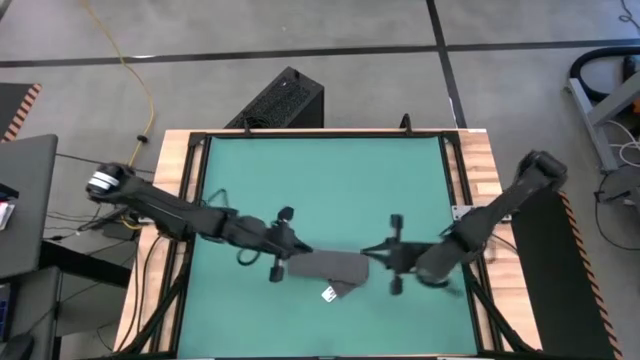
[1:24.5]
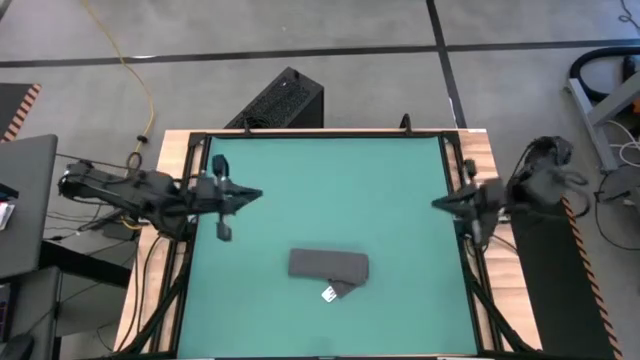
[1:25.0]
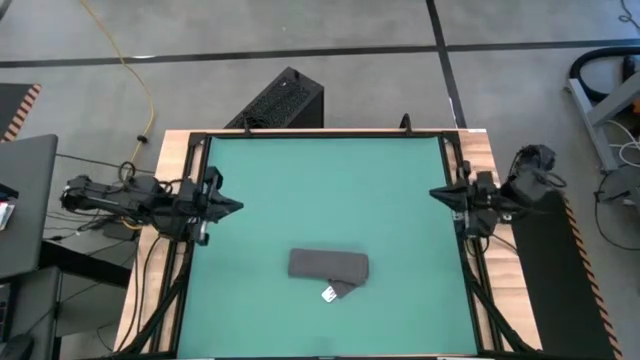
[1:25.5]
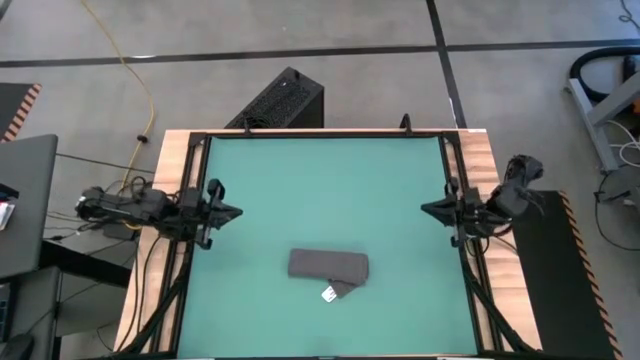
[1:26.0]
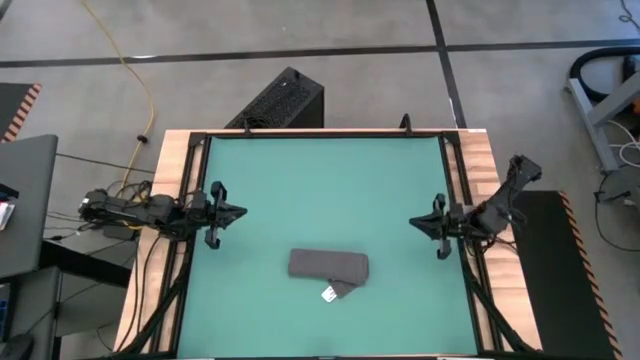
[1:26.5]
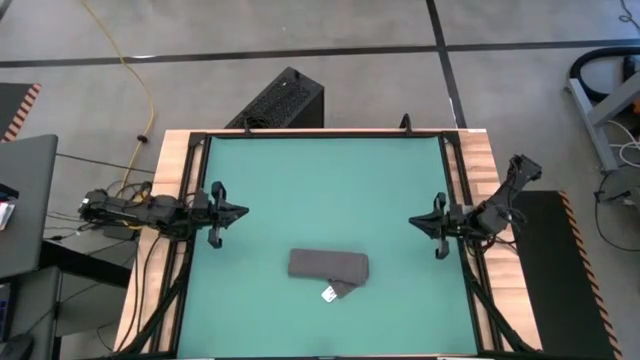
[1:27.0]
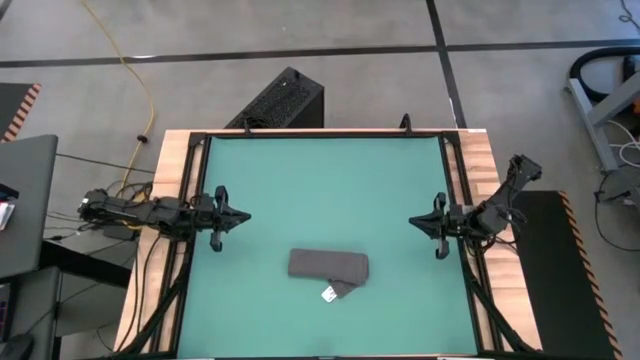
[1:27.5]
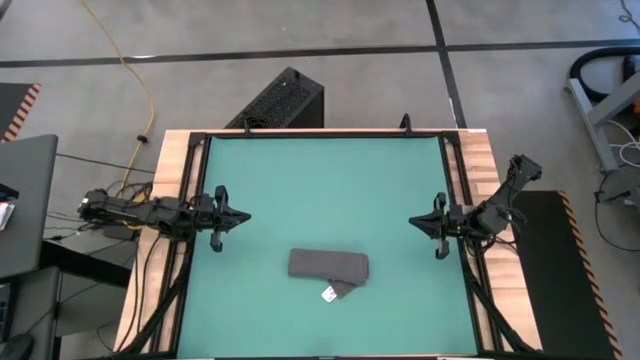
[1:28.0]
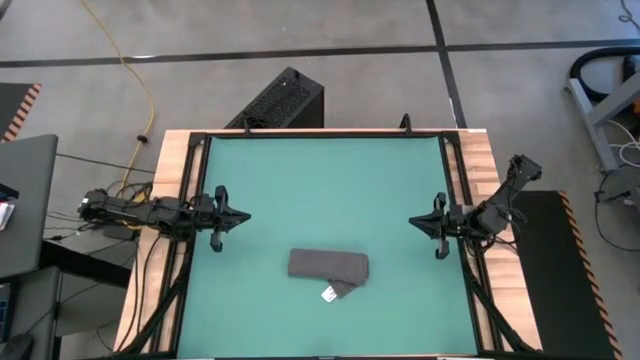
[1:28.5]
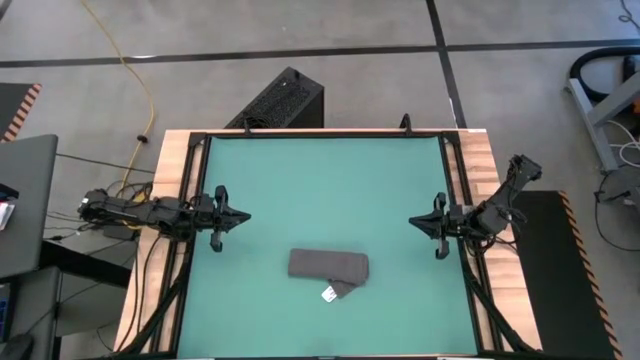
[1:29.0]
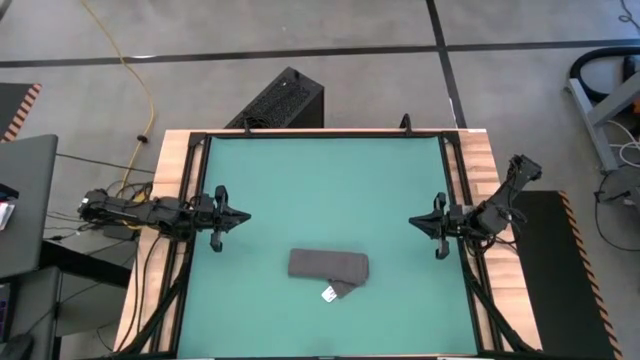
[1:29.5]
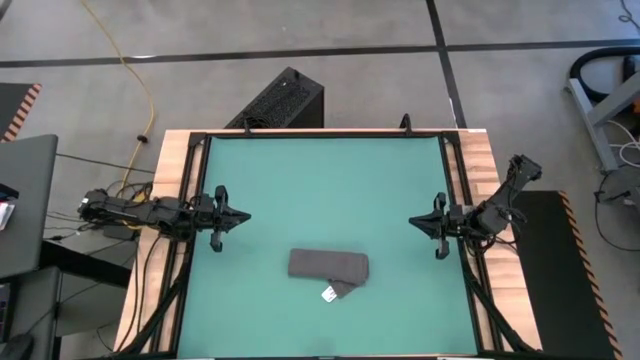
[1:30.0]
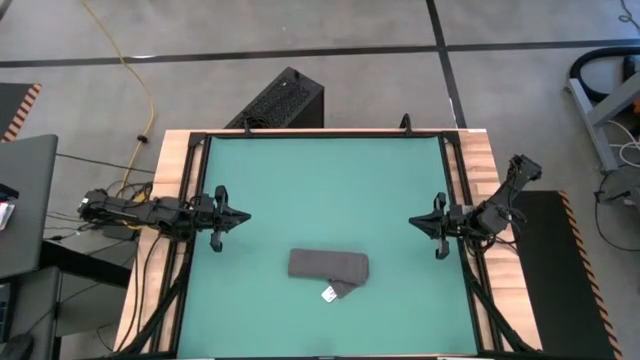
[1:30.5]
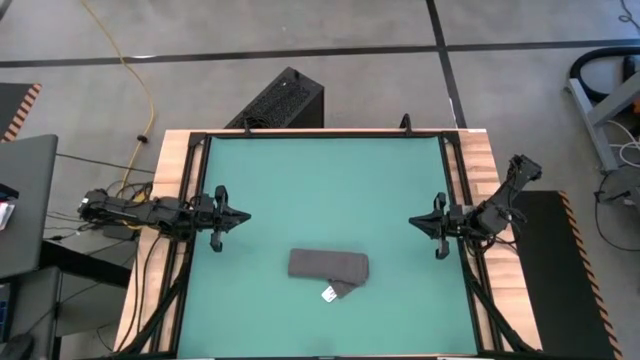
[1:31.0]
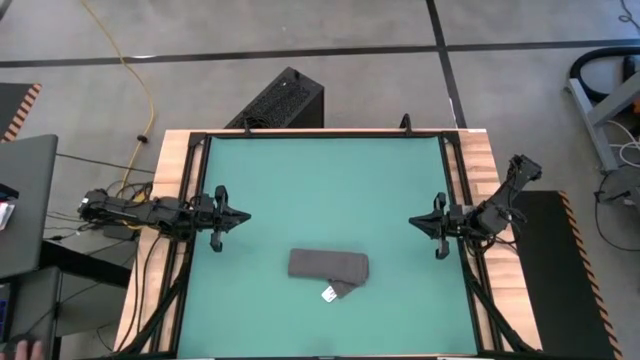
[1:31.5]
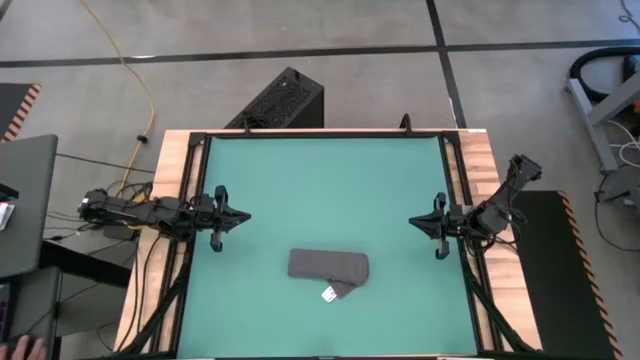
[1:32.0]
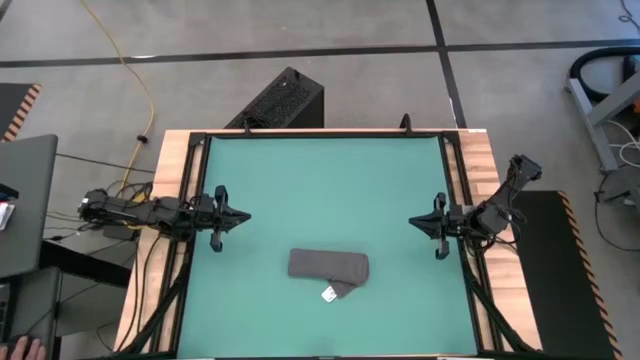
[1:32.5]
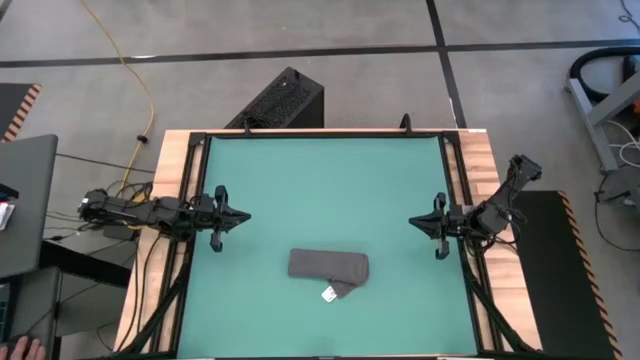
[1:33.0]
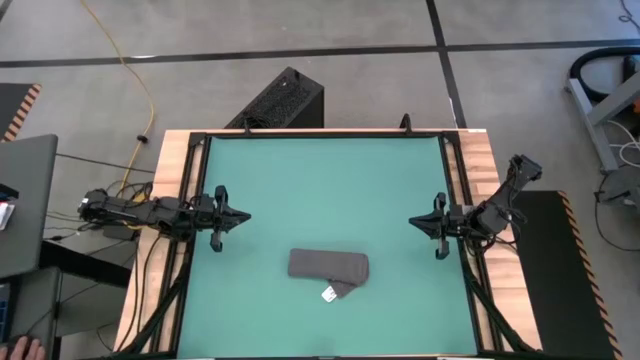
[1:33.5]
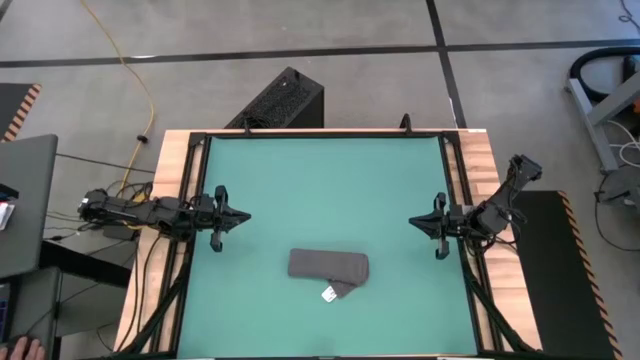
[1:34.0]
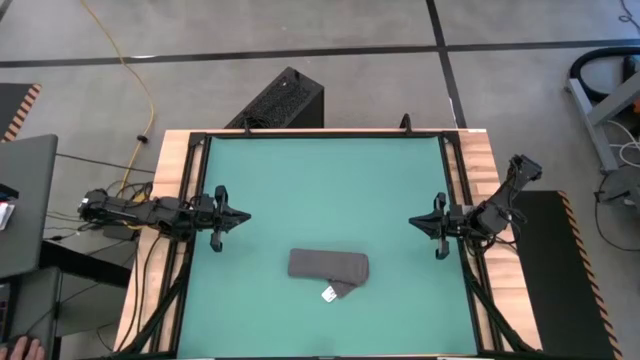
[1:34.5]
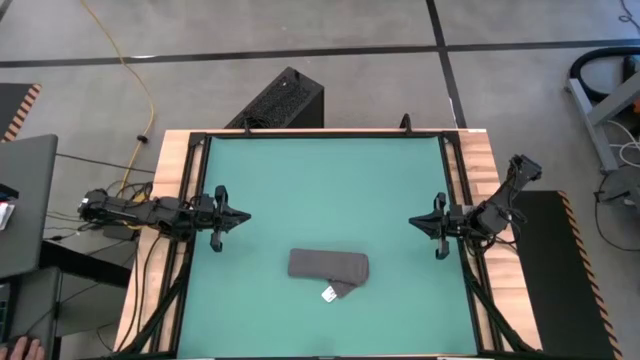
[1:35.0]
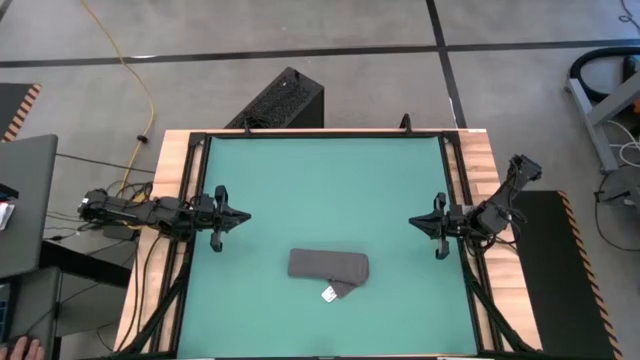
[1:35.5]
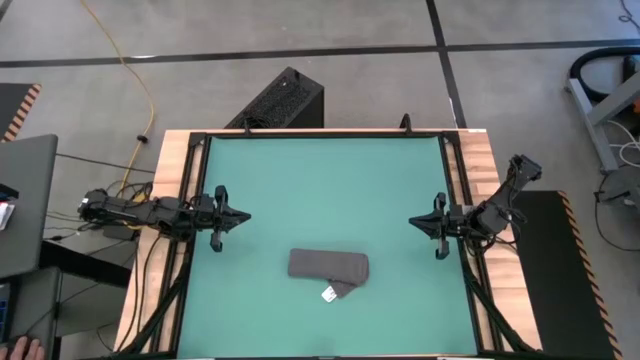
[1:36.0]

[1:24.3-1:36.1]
Task: Roll towel into tight, uniform cylinder
Return to Home Position

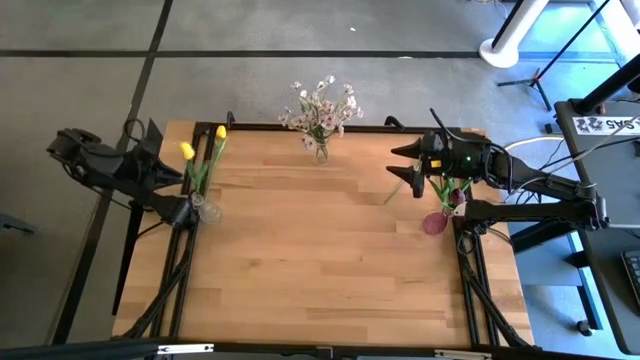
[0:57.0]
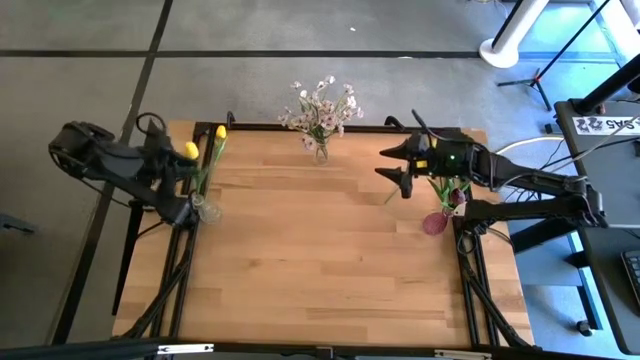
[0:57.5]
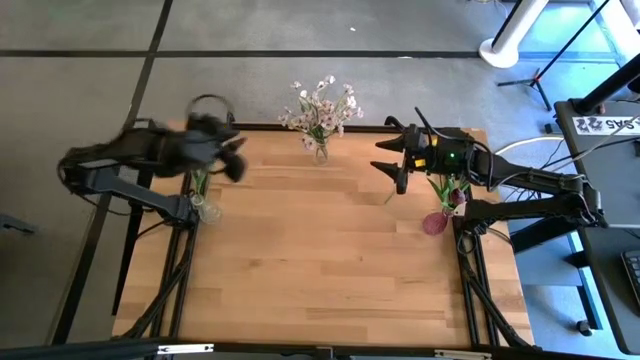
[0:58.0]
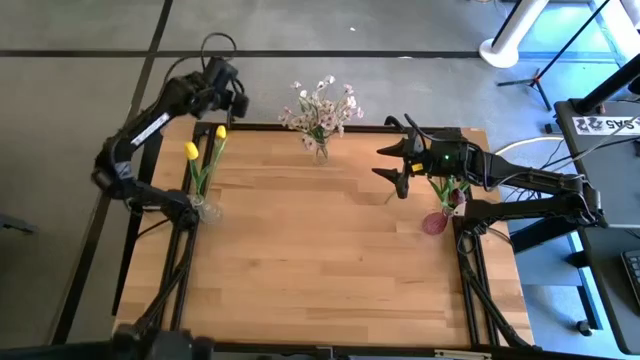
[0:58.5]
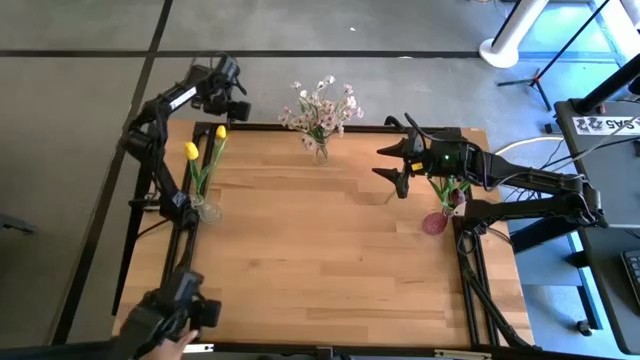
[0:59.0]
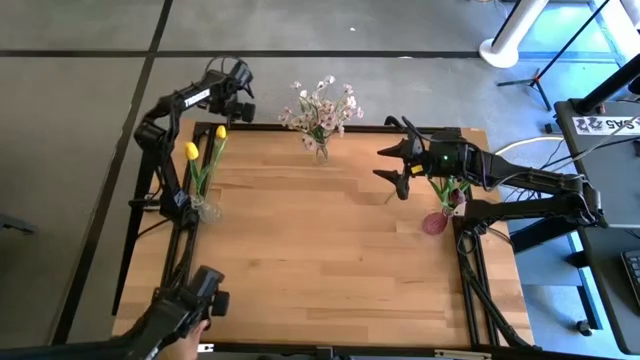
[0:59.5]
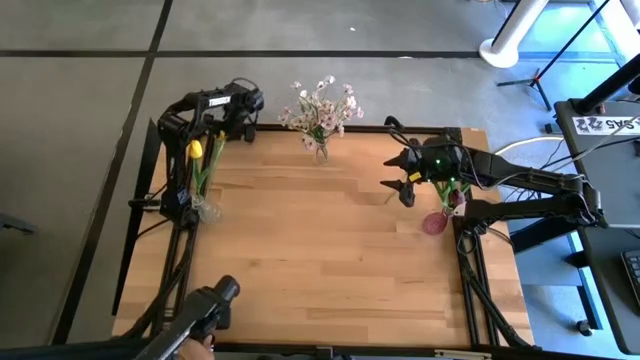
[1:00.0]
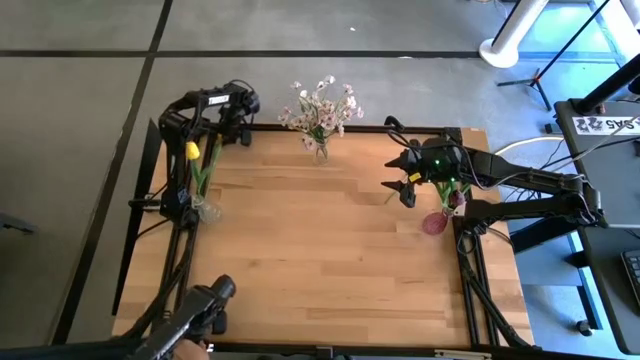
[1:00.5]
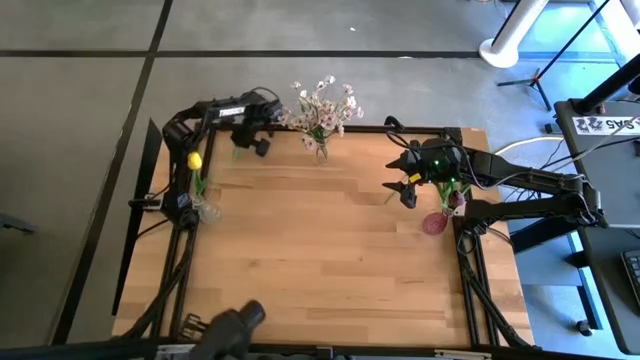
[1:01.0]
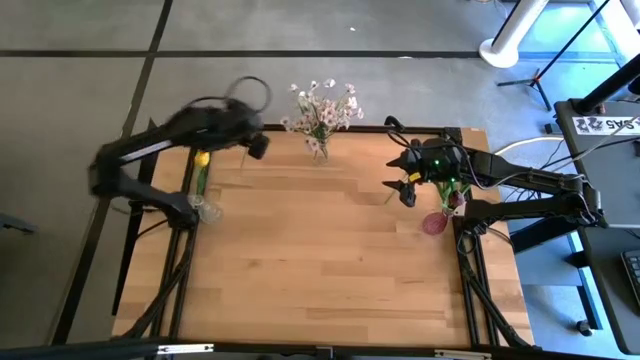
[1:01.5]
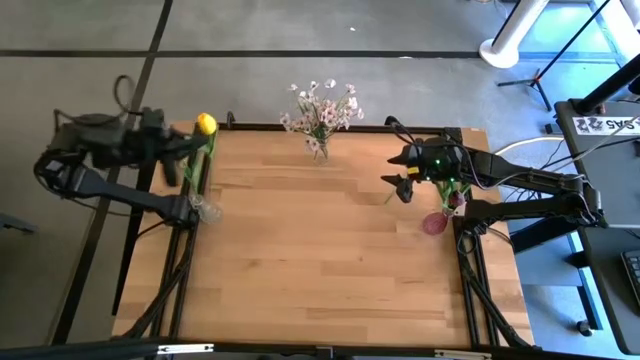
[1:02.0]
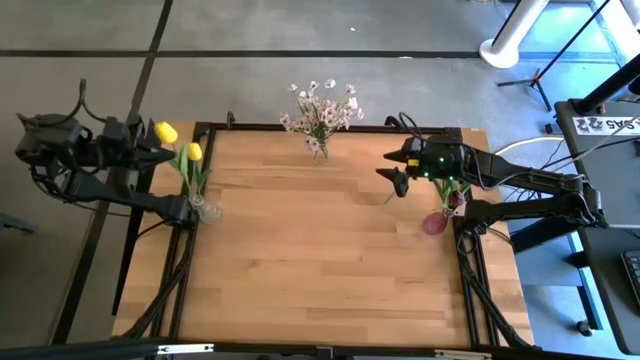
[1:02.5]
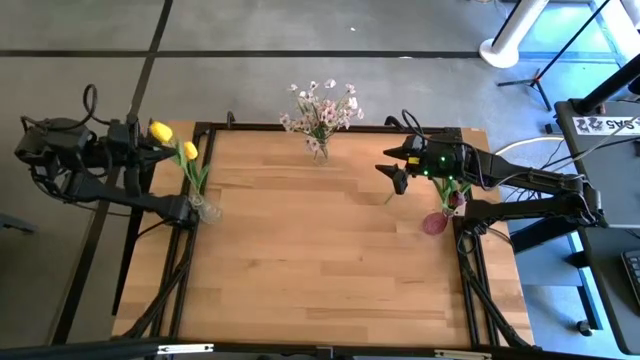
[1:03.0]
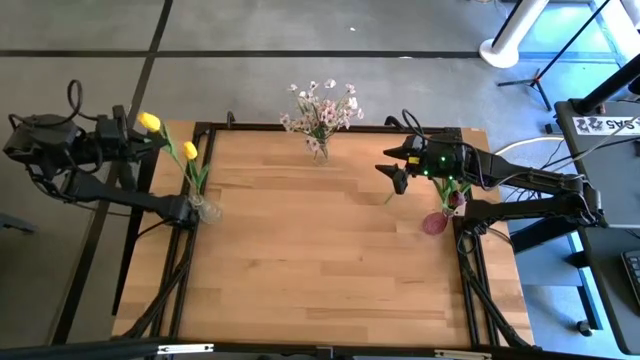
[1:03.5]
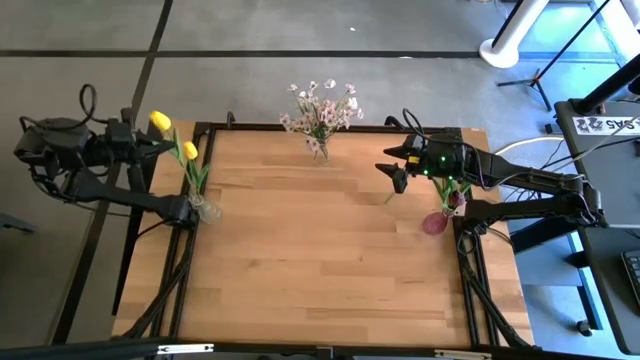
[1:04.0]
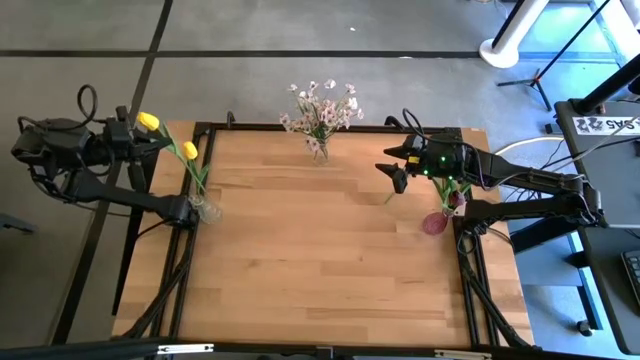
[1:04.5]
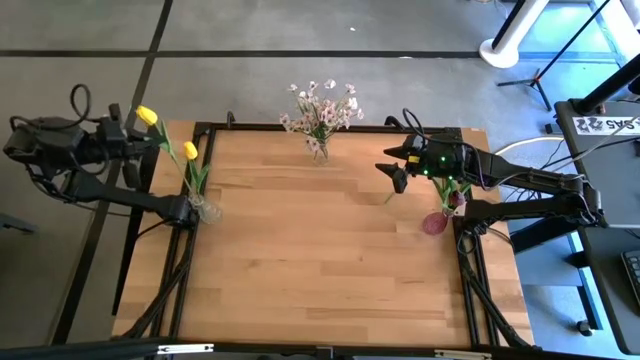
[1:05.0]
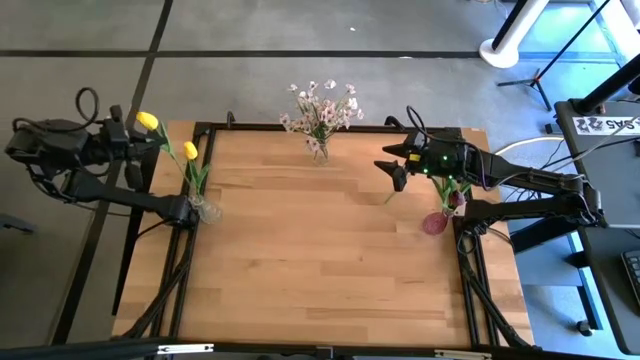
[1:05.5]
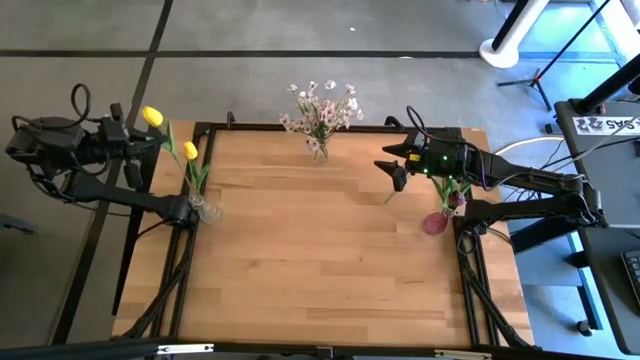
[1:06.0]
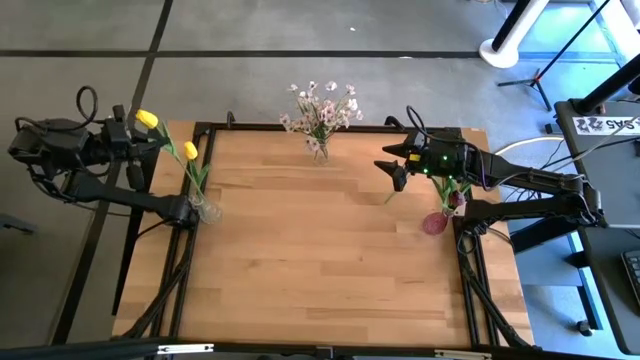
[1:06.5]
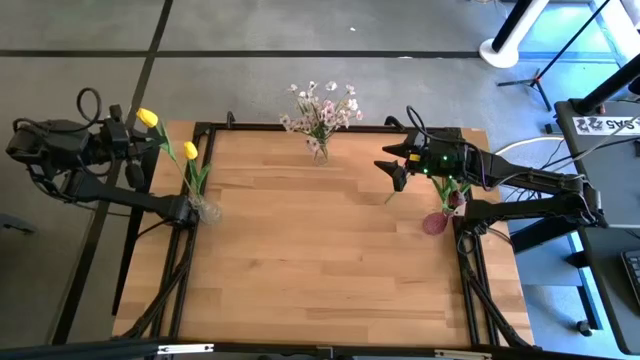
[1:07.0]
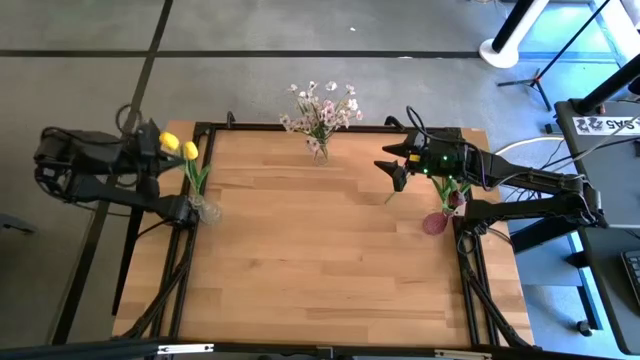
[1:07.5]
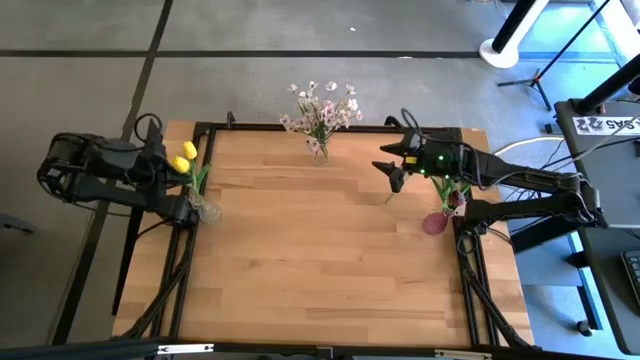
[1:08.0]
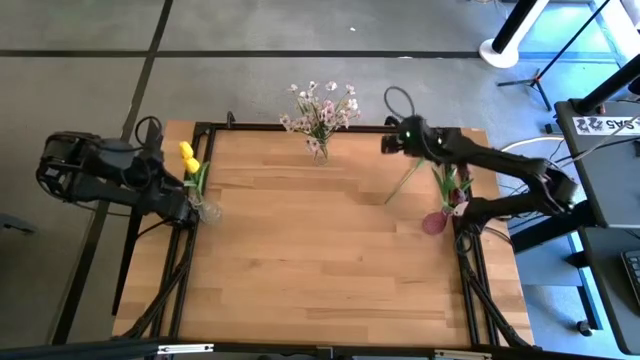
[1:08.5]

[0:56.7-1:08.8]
Task: Sort flowers into vase by color
Put the left yellow flower into the bottom transparent vase
